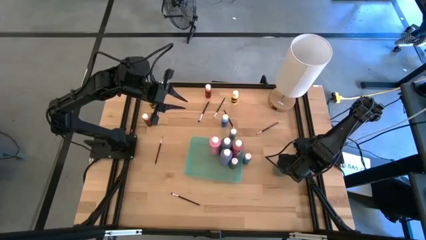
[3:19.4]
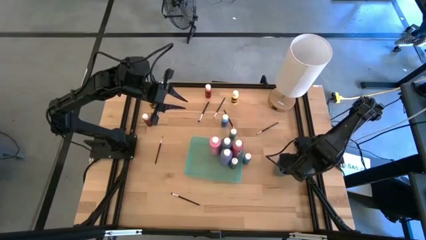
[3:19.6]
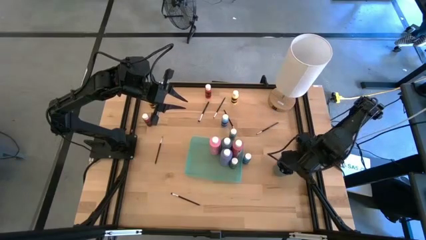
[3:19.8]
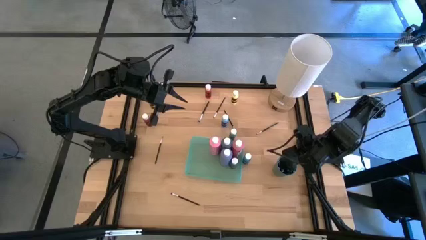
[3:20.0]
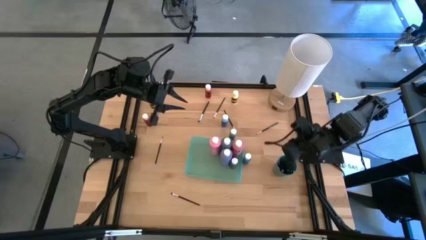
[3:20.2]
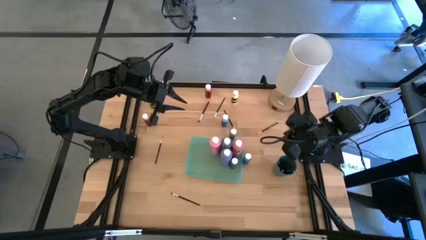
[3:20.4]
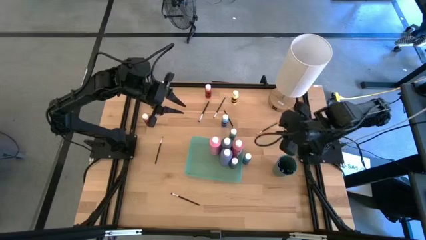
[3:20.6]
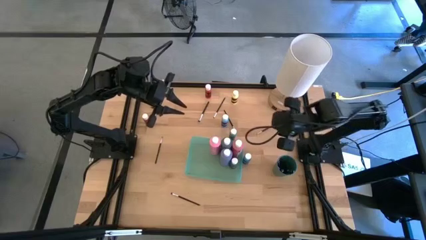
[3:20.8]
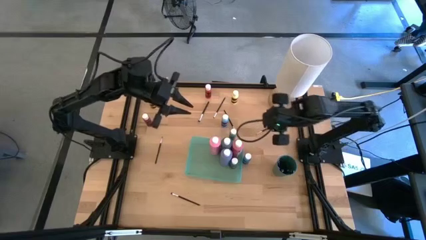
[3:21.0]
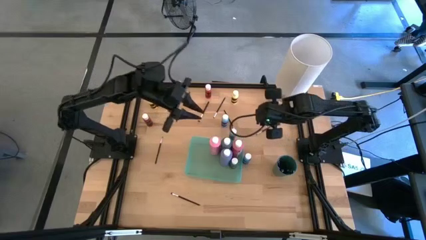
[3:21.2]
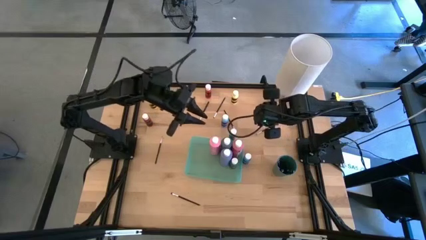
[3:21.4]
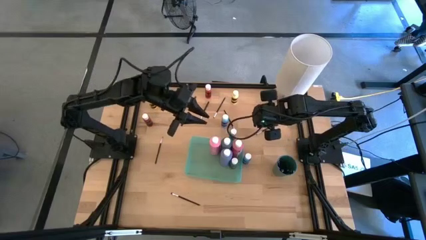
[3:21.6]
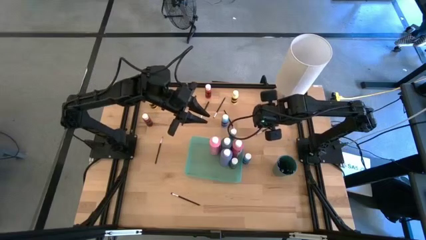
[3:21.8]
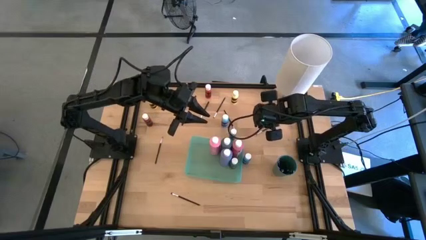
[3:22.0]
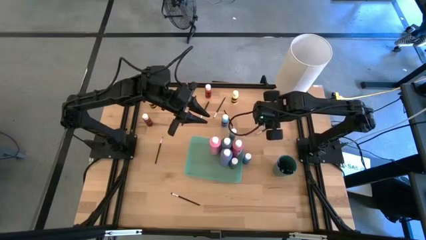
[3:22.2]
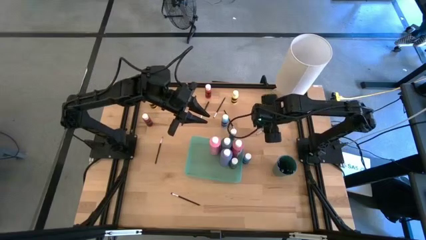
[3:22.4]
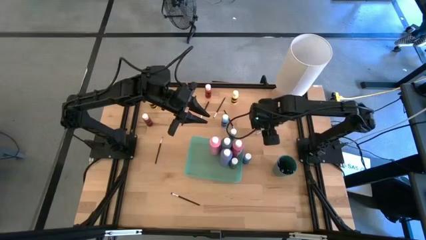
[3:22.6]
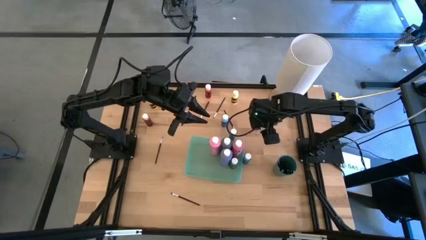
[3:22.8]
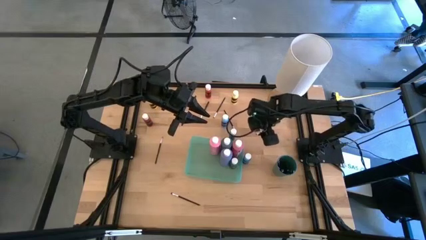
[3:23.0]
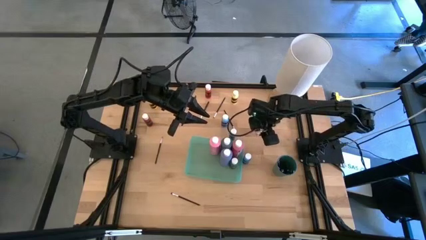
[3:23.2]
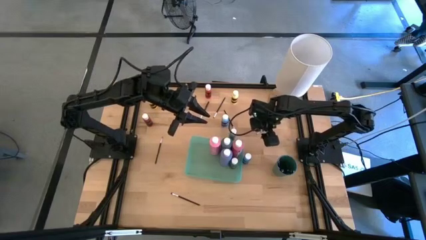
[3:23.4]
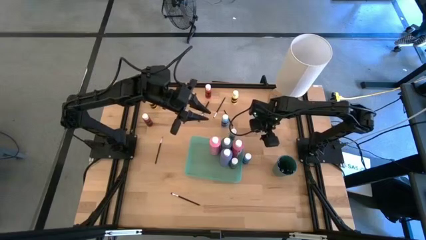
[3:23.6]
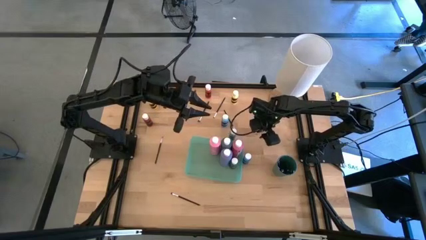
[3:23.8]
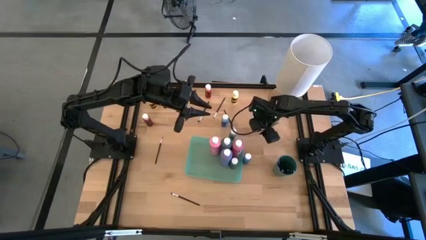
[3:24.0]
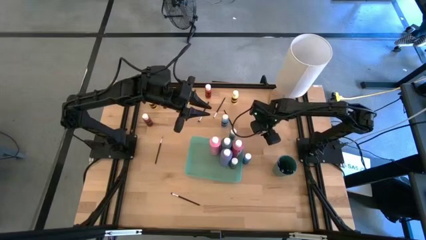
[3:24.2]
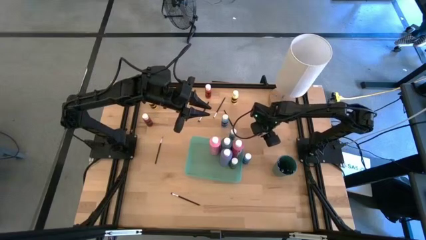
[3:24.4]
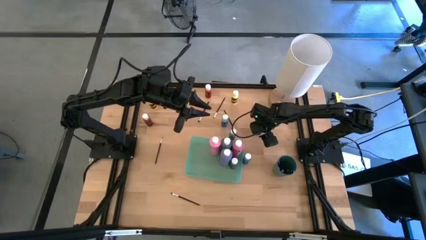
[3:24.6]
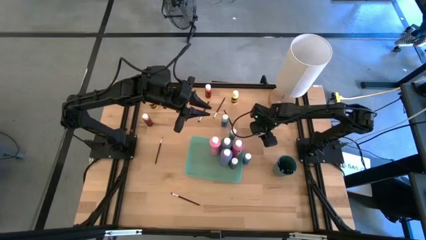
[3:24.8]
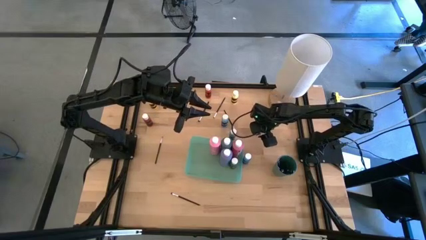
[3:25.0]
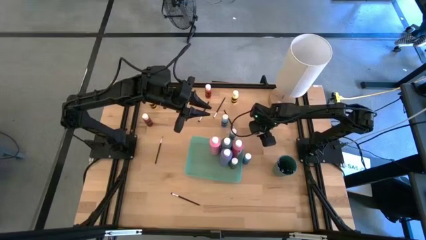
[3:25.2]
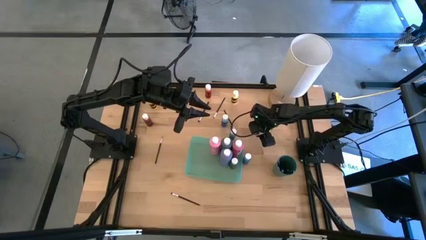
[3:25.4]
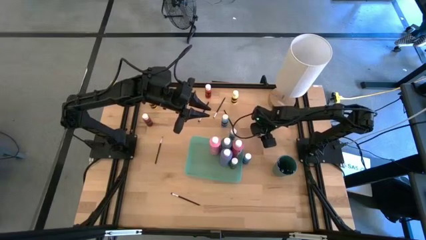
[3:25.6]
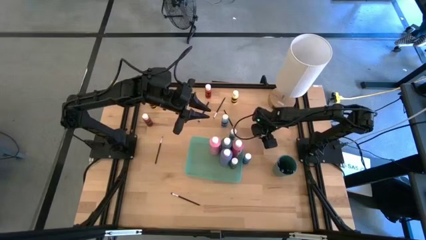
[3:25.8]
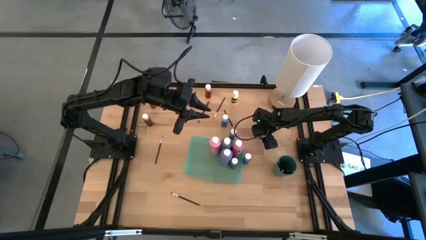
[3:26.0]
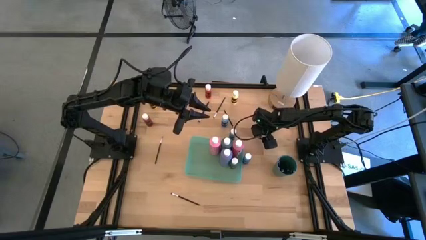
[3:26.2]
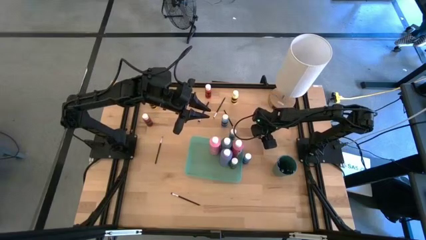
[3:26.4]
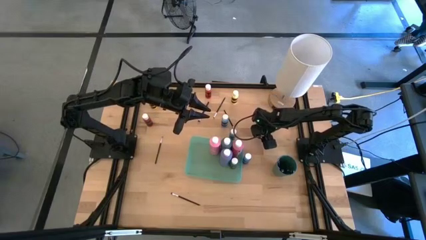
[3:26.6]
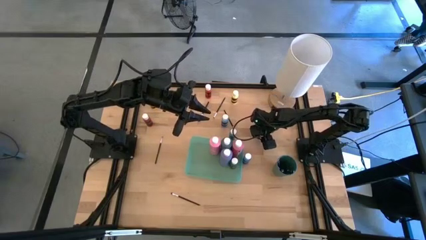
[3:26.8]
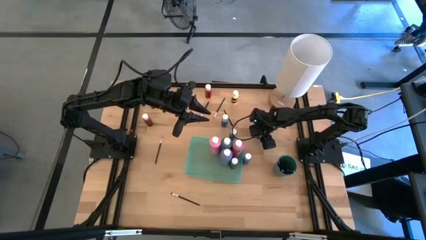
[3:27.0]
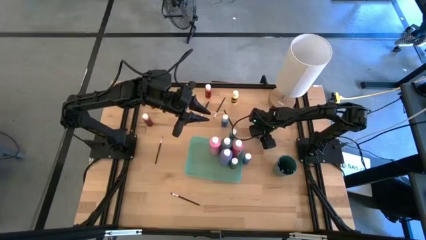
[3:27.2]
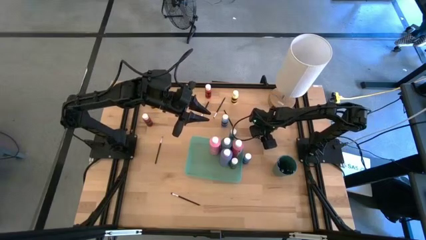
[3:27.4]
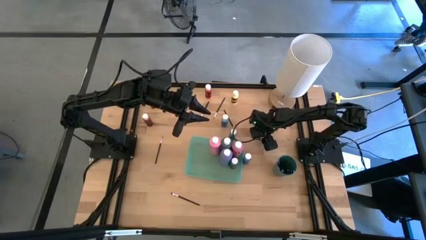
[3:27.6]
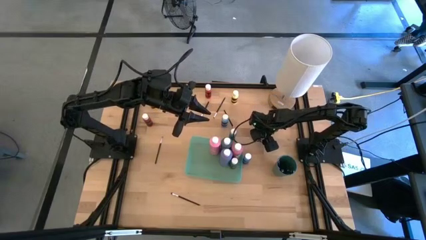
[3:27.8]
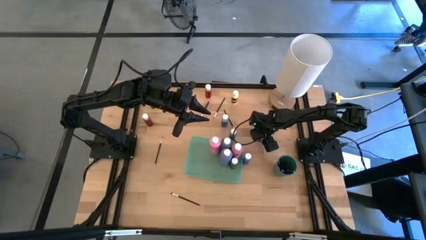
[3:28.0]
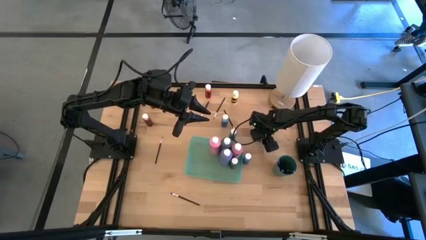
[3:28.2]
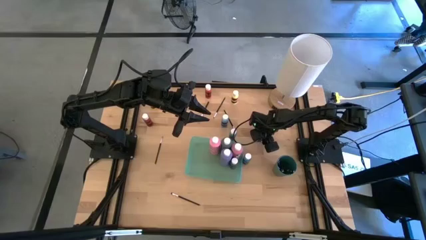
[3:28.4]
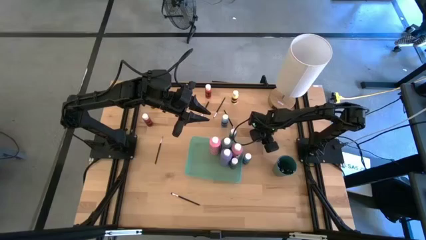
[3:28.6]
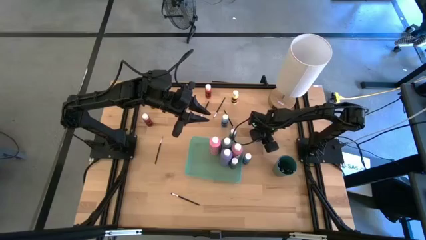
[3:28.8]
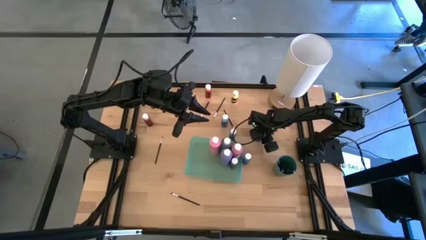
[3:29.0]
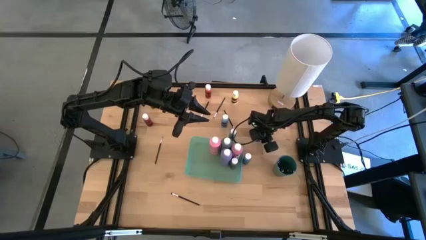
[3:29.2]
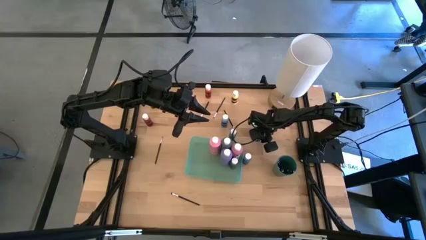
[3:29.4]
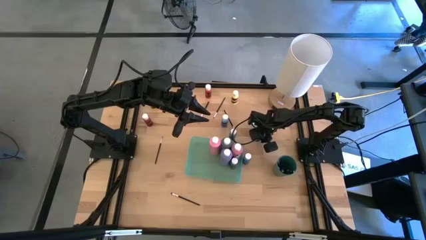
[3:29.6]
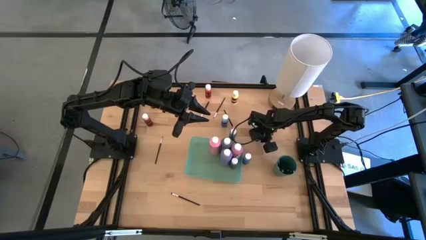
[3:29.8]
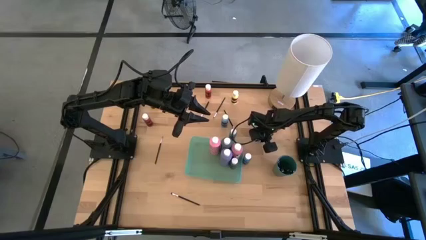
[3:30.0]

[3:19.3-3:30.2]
Task: Pick & Place Paint Supplies
Put the black eyeshadow brush into the green cup
